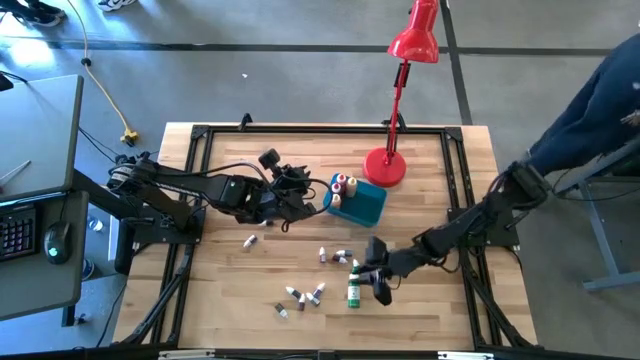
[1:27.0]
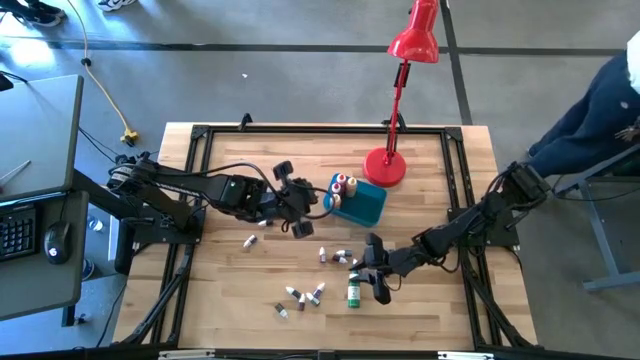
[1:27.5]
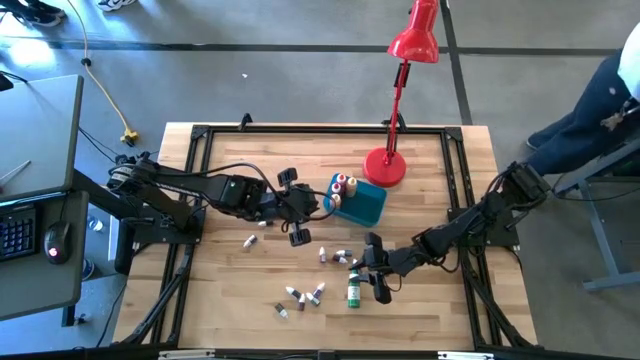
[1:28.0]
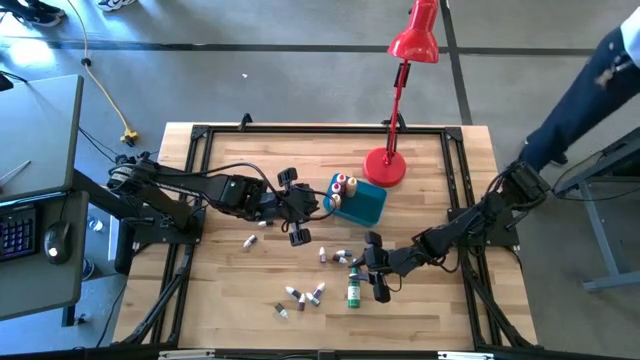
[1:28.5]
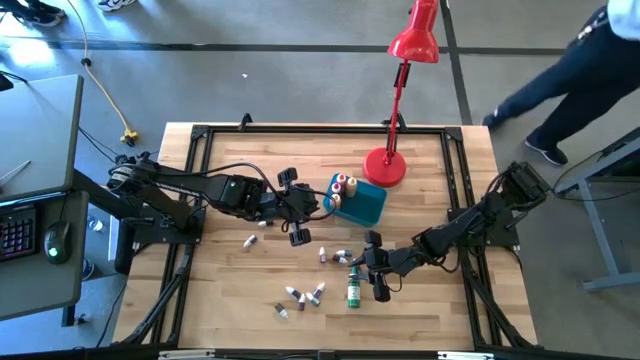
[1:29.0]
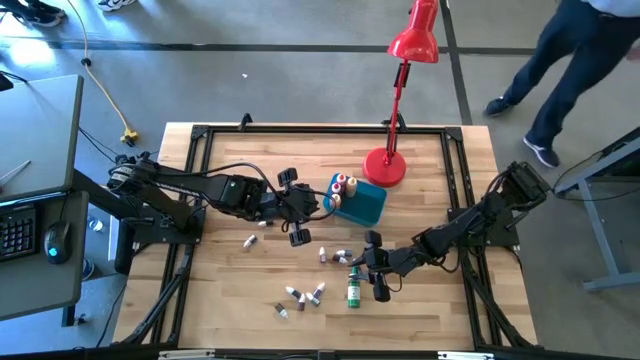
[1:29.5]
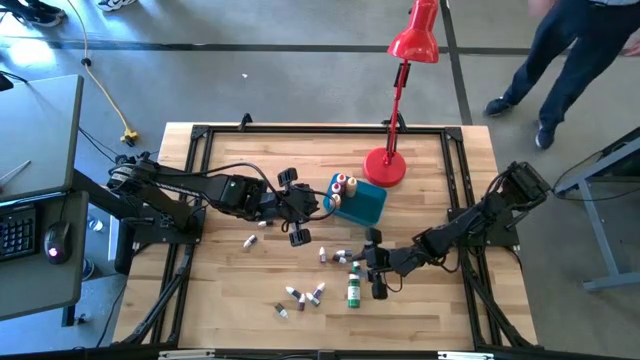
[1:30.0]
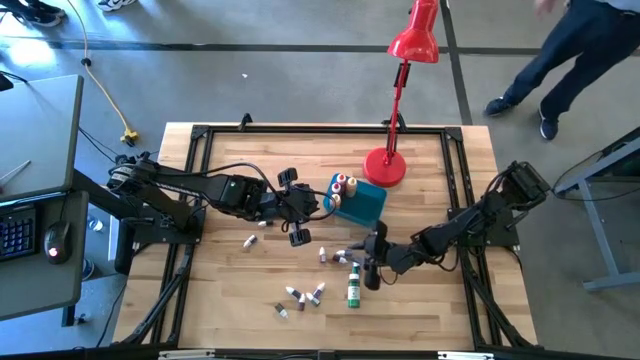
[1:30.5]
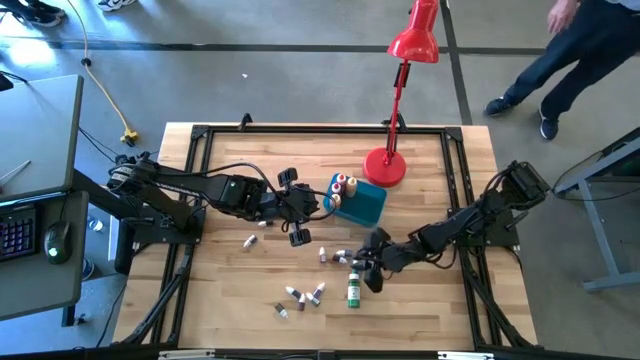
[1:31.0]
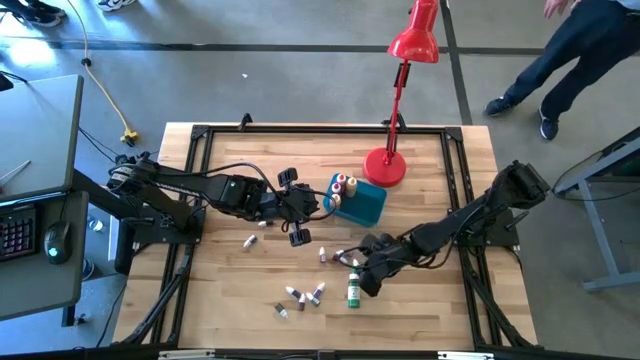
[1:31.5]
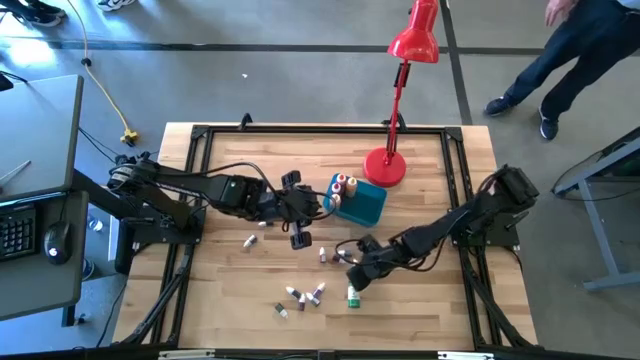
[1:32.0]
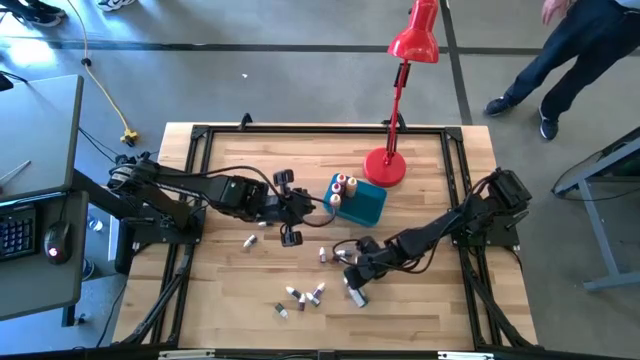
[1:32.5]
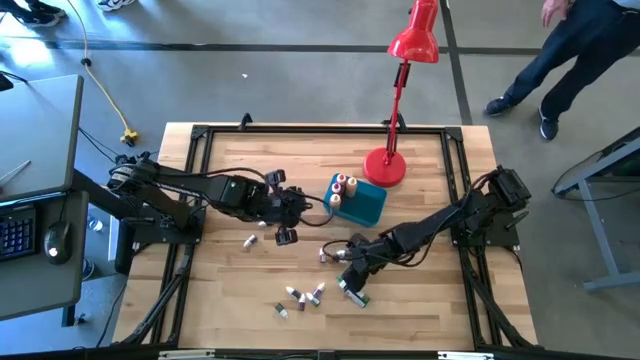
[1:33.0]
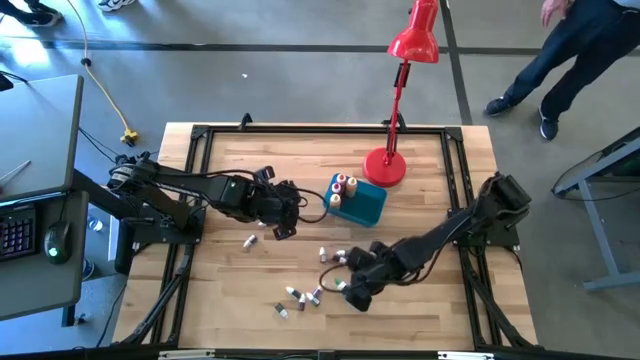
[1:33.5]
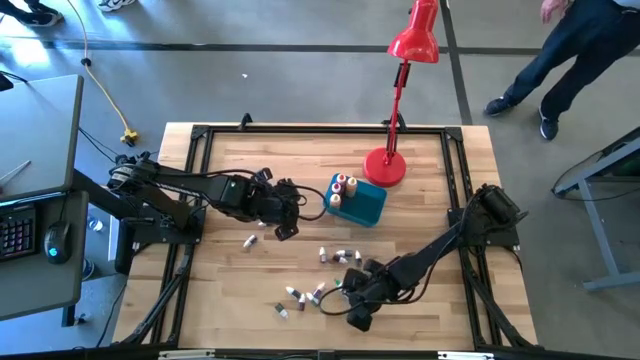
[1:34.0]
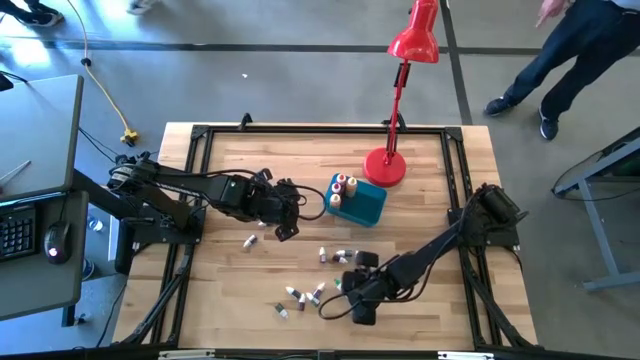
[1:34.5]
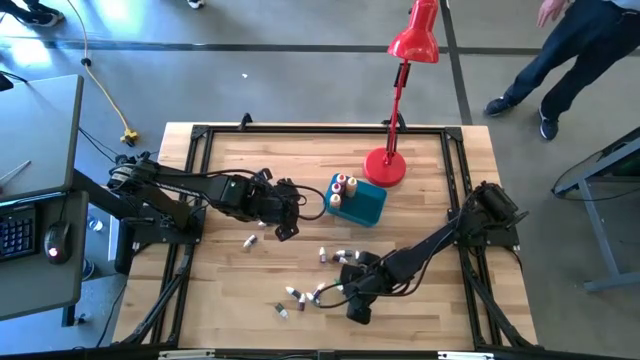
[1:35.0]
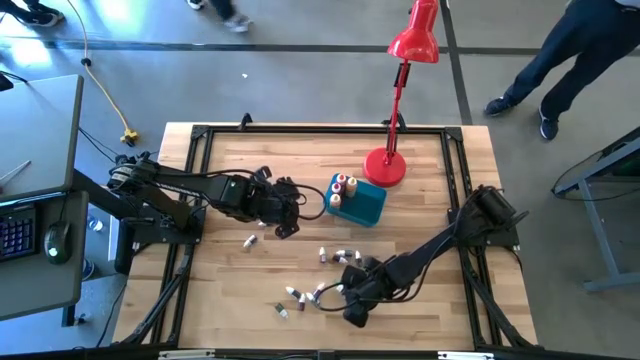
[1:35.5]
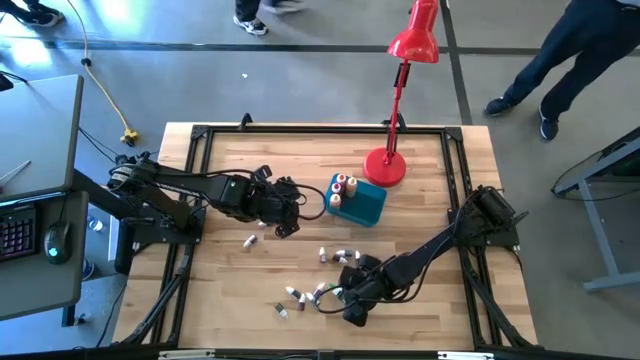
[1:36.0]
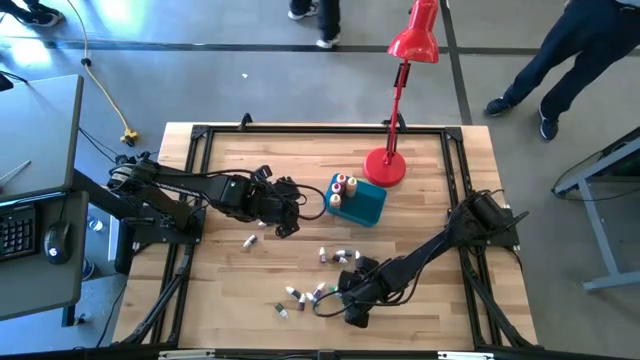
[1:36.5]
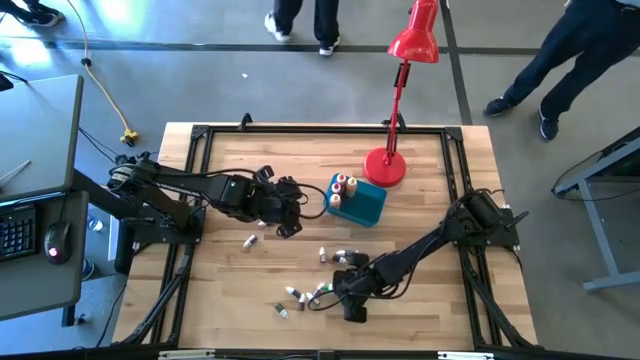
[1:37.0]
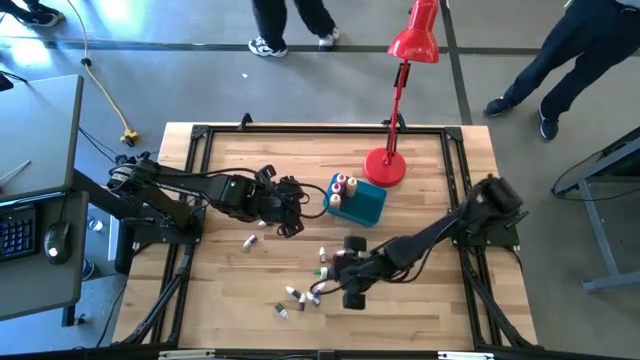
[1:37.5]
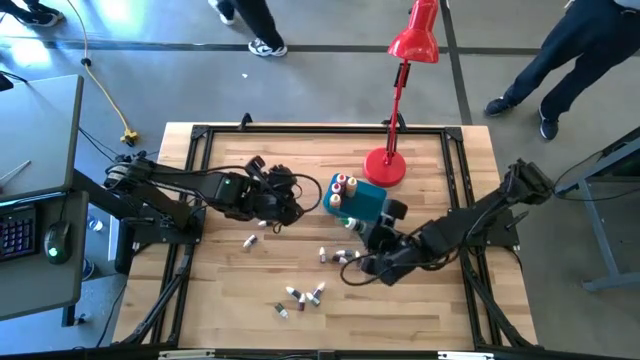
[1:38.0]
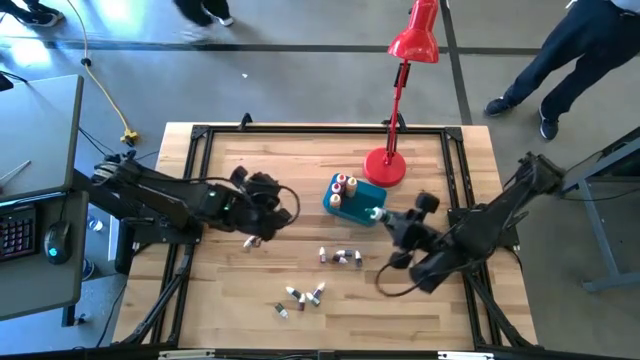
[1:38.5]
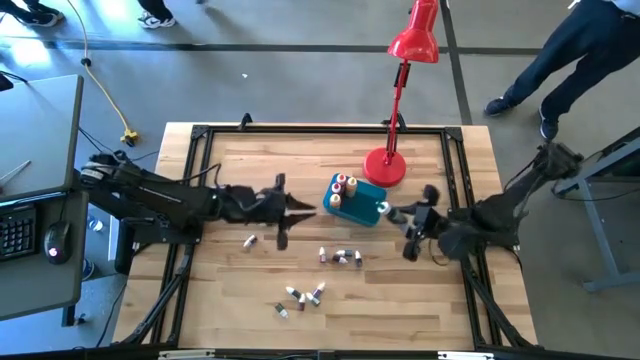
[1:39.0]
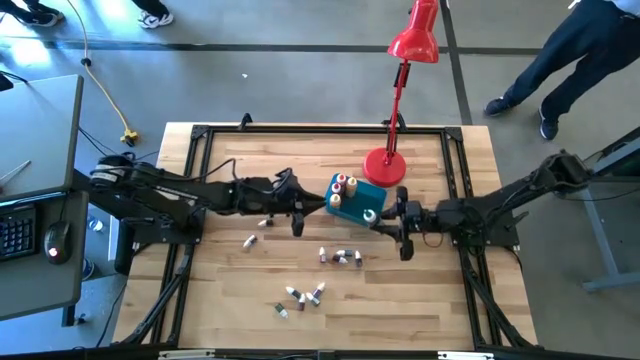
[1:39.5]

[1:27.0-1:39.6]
Task: Pick & Place food coloring
Put the big green food coloring bottle into the blue container

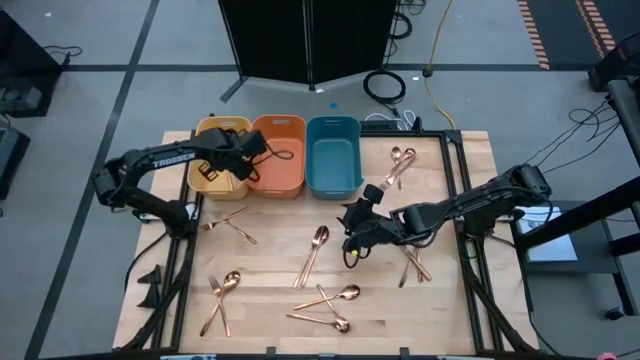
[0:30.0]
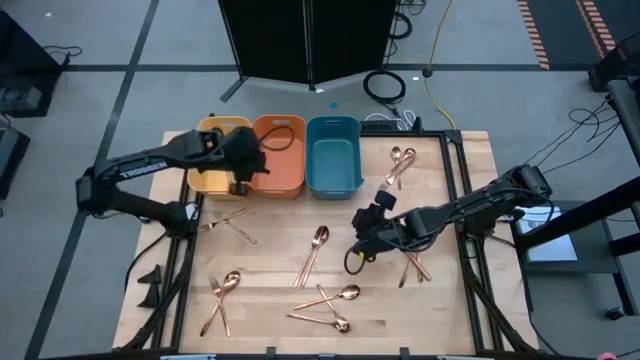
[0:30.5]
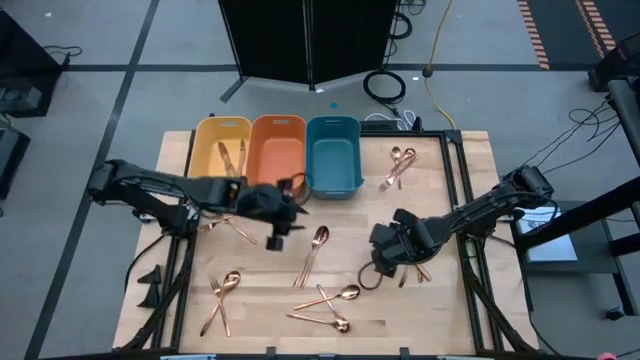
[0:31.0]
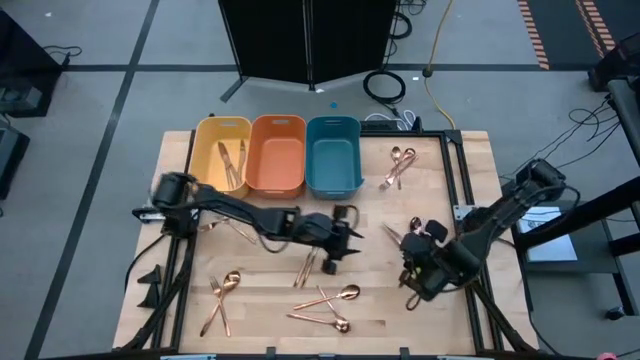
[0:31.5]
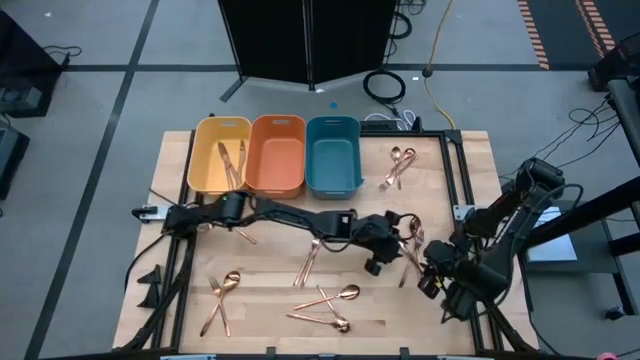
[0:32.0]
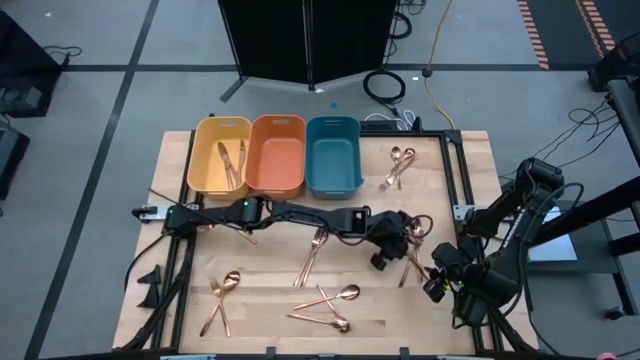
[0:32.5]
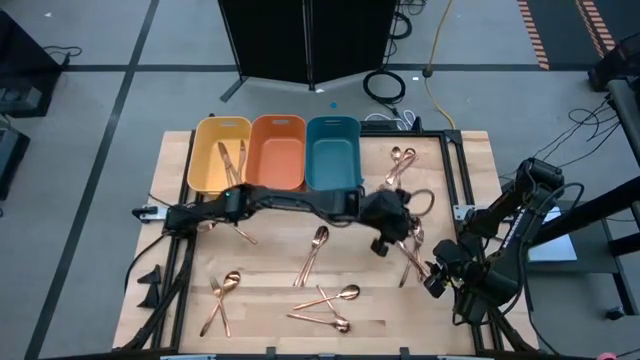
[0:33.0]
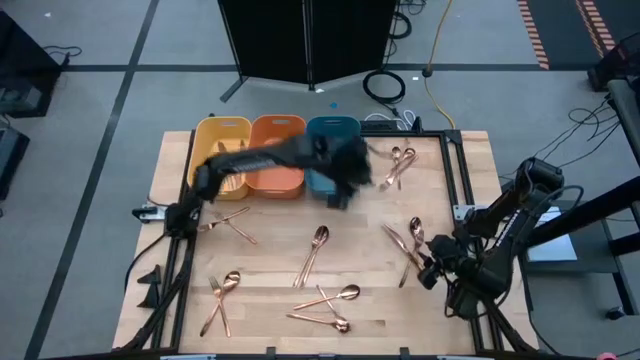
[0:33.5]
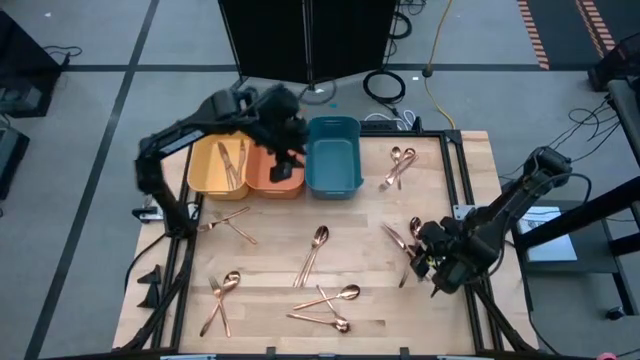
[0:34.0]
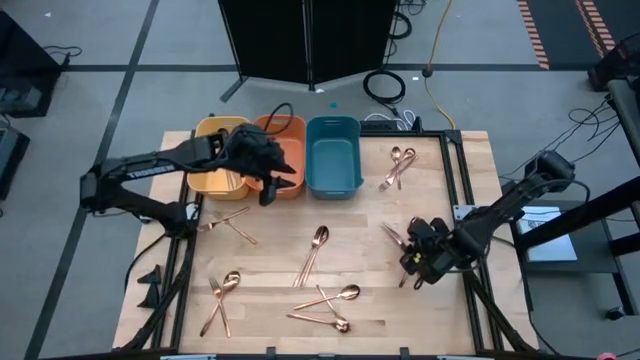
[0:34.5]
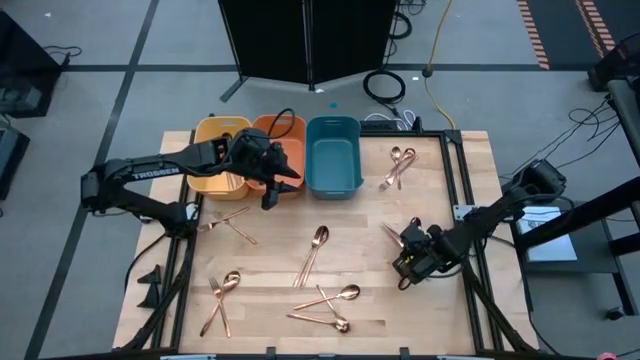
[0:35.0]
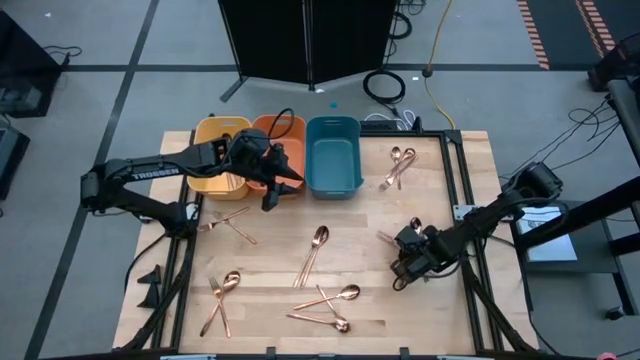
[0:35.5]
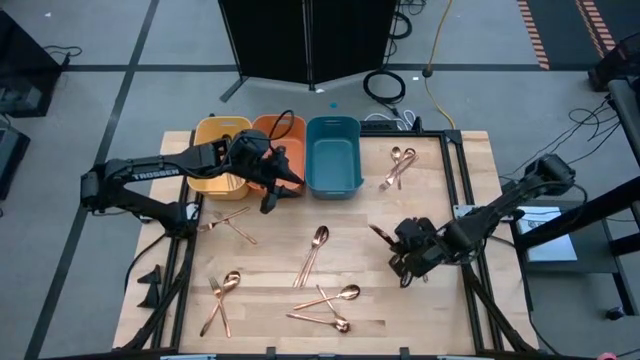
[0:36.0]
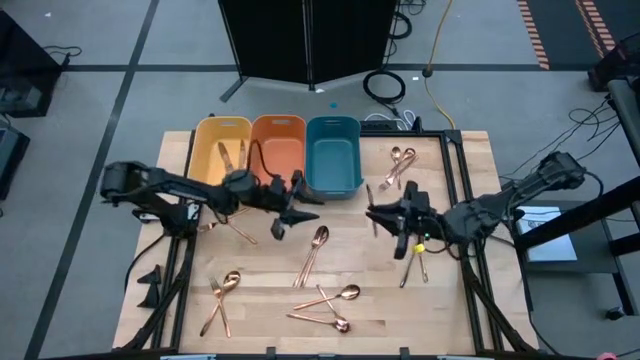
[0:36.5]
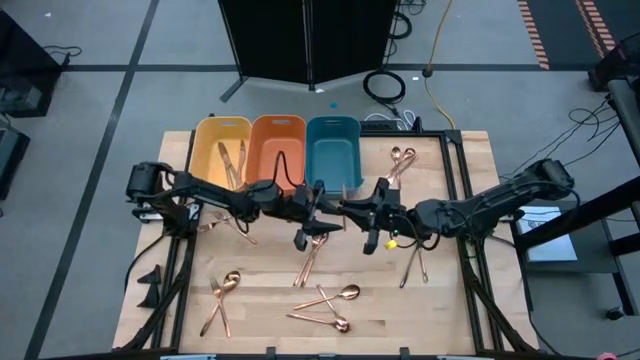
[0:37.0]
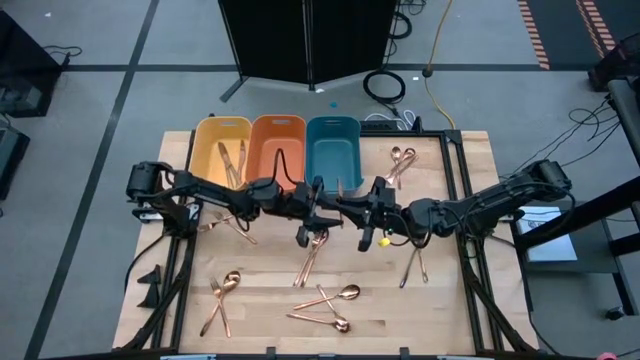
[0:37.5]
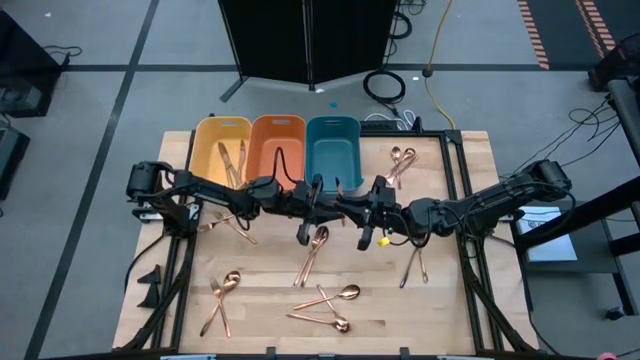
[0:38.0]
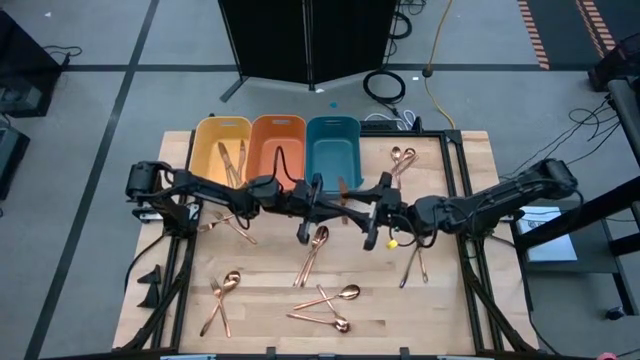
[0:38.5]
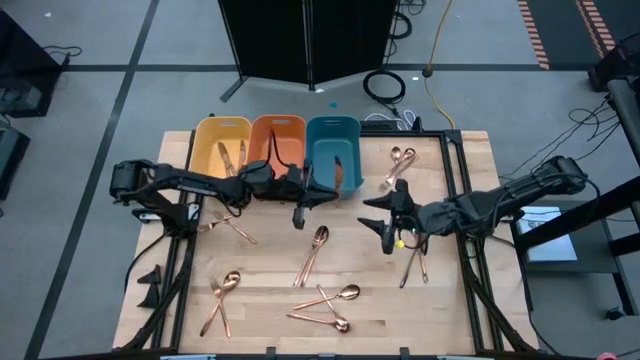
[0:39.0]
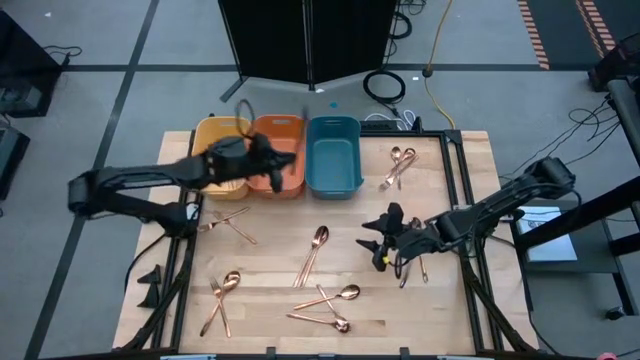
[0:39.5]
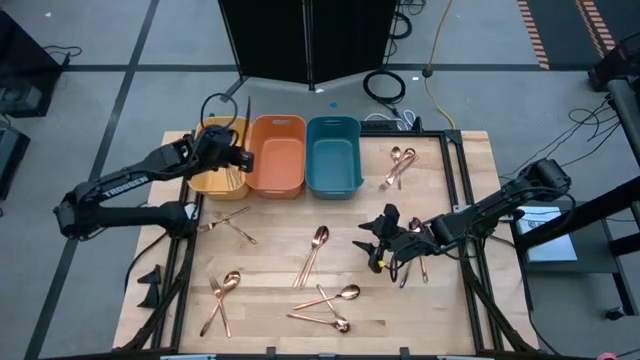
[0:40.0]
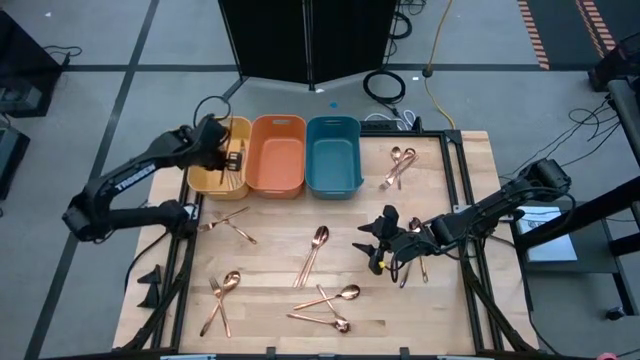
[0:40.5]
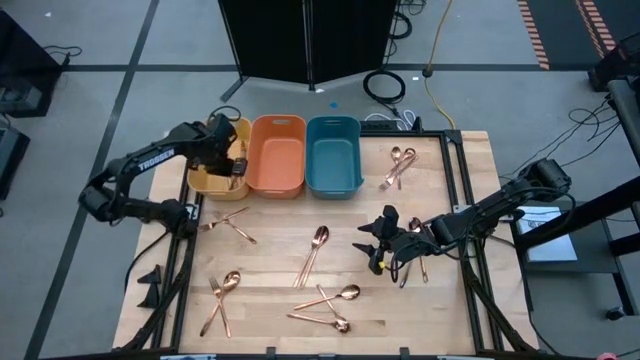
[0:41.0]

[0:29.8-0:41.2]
Task: Sort silverware
Put the gold table knife into the yellow bin
